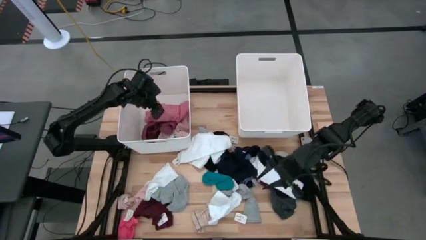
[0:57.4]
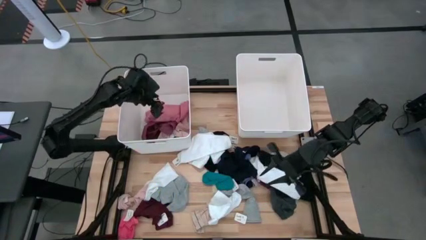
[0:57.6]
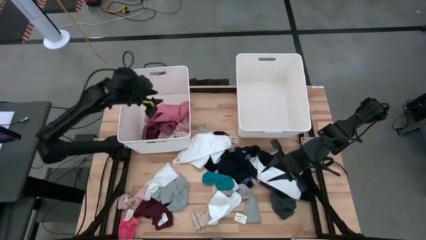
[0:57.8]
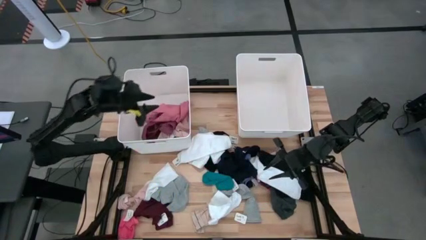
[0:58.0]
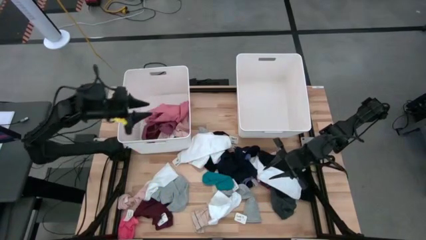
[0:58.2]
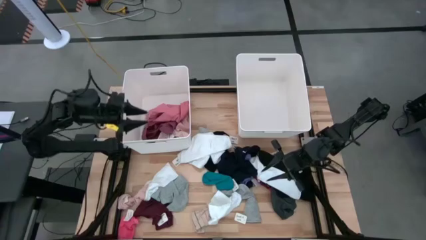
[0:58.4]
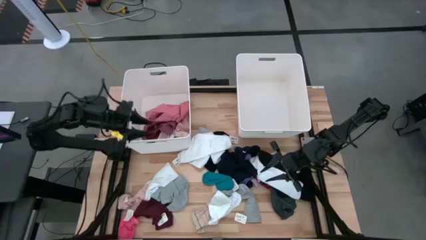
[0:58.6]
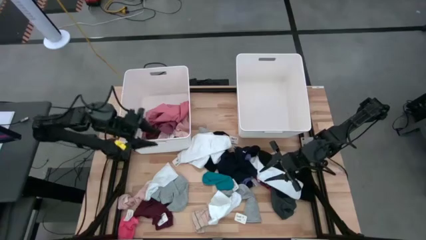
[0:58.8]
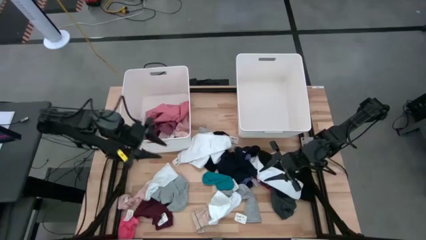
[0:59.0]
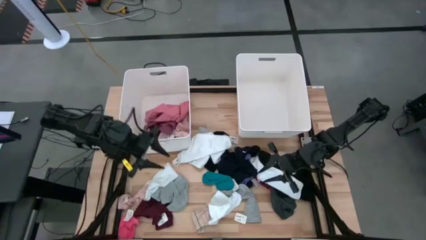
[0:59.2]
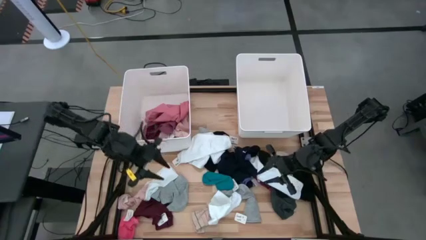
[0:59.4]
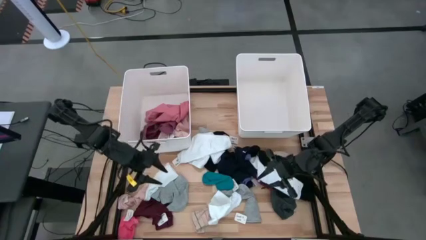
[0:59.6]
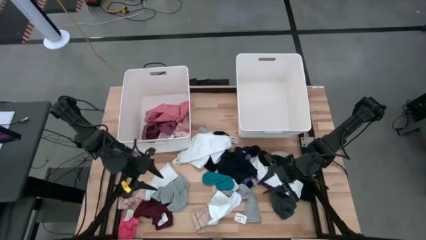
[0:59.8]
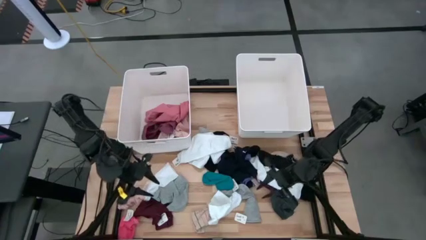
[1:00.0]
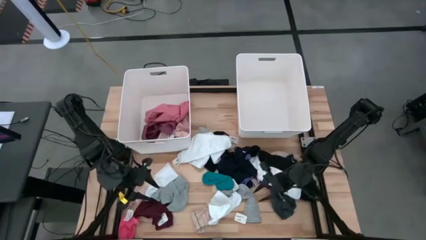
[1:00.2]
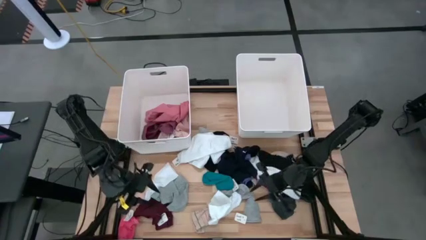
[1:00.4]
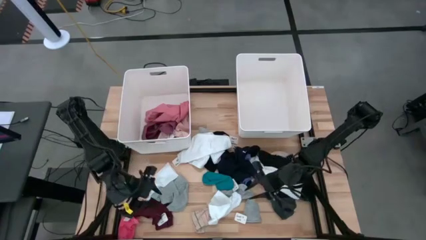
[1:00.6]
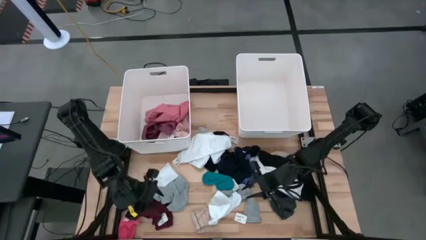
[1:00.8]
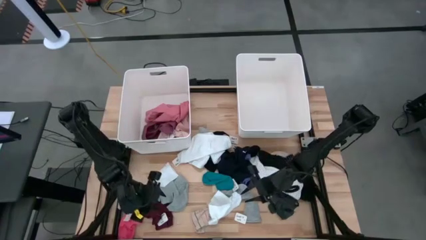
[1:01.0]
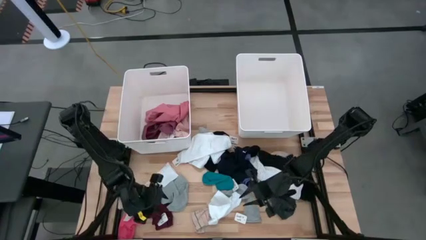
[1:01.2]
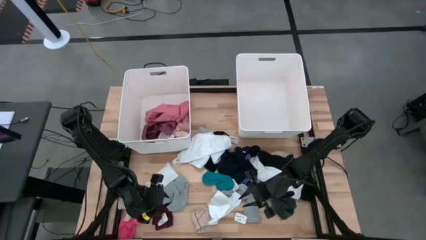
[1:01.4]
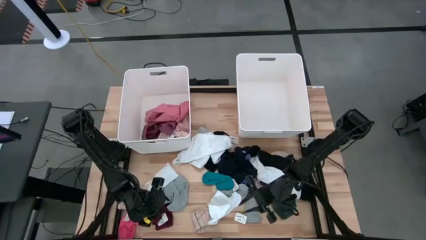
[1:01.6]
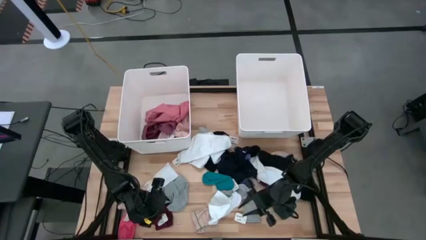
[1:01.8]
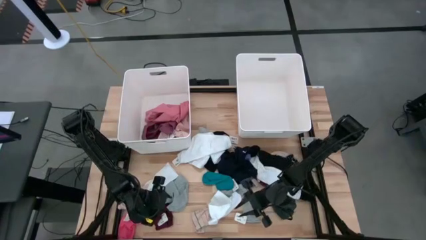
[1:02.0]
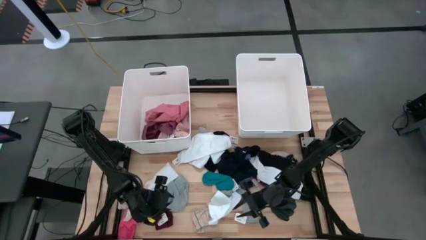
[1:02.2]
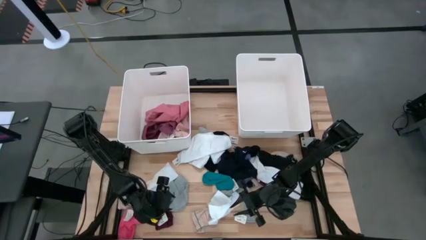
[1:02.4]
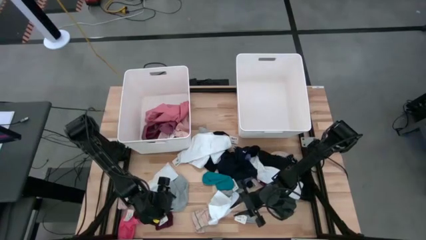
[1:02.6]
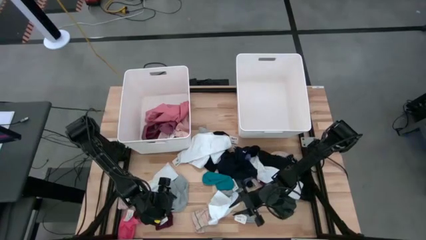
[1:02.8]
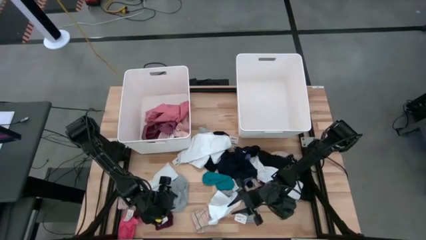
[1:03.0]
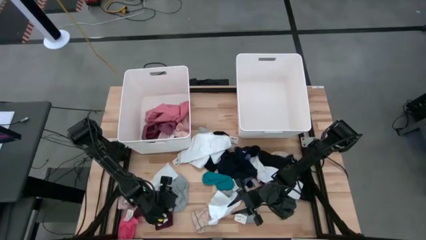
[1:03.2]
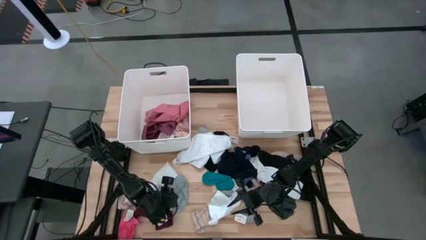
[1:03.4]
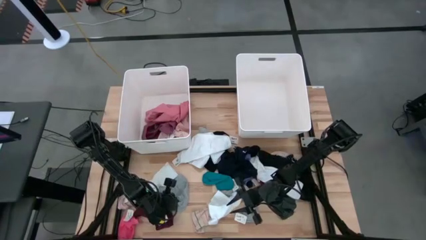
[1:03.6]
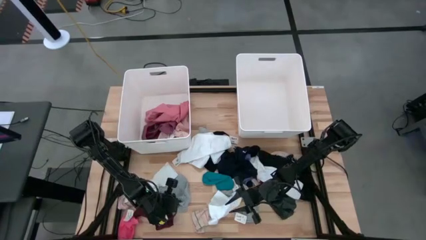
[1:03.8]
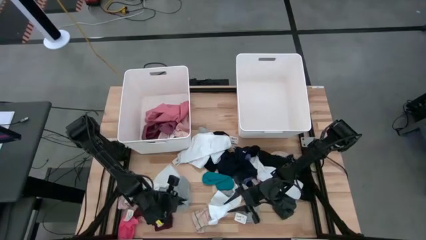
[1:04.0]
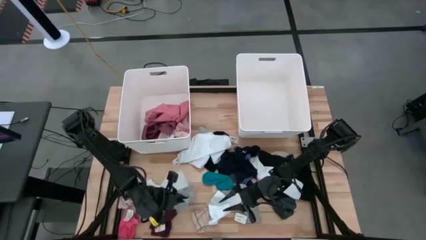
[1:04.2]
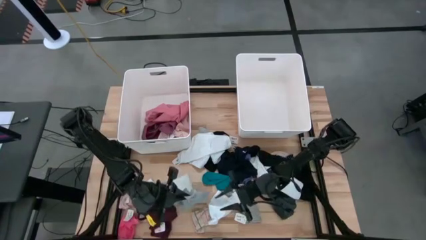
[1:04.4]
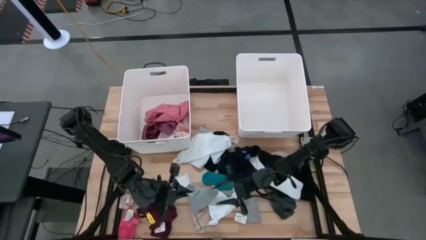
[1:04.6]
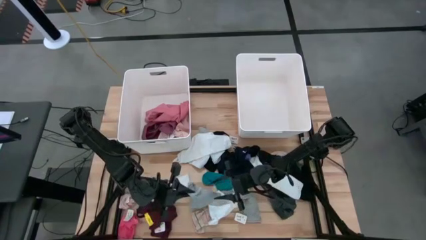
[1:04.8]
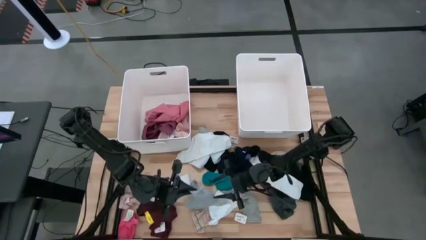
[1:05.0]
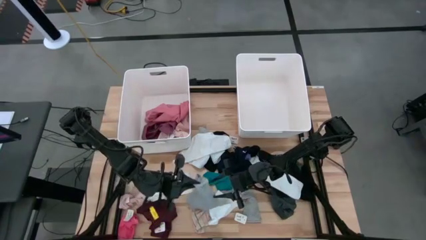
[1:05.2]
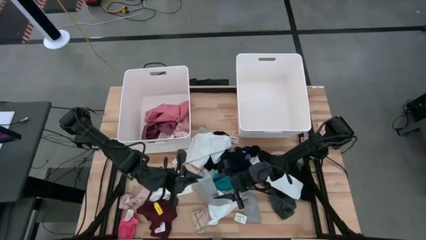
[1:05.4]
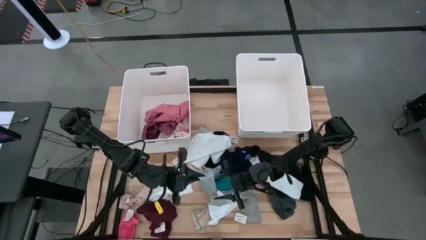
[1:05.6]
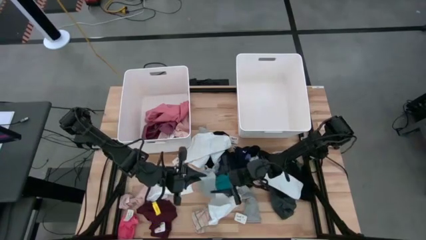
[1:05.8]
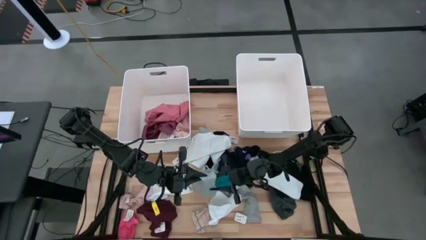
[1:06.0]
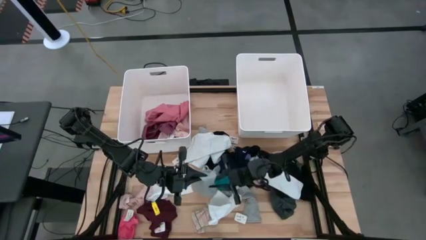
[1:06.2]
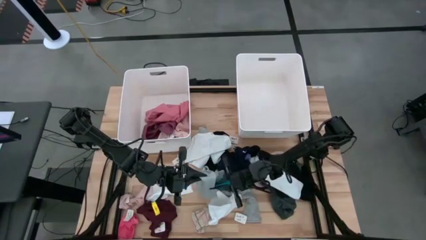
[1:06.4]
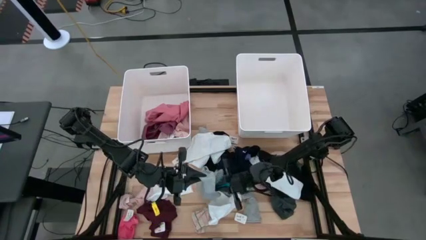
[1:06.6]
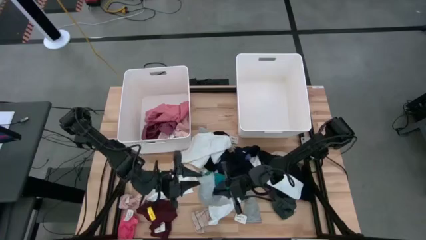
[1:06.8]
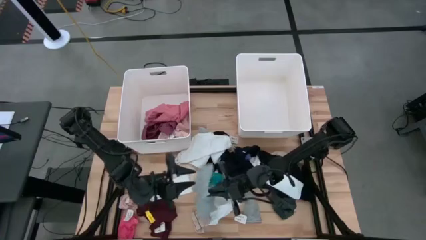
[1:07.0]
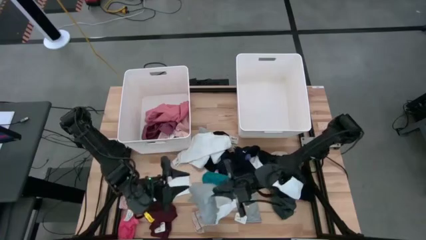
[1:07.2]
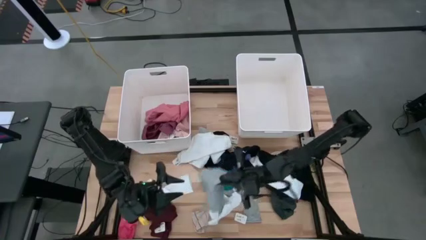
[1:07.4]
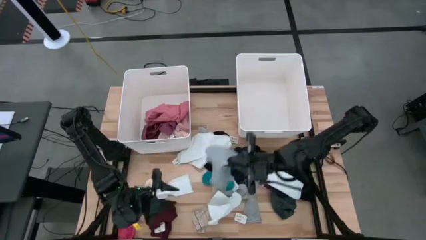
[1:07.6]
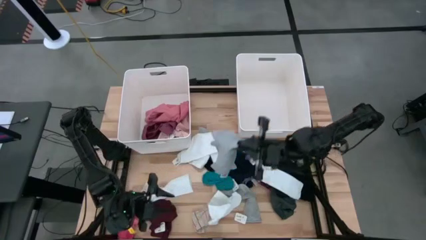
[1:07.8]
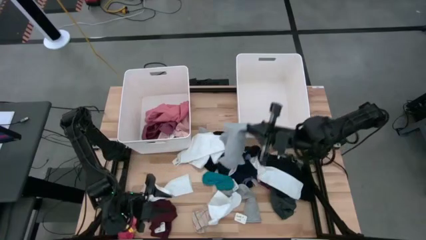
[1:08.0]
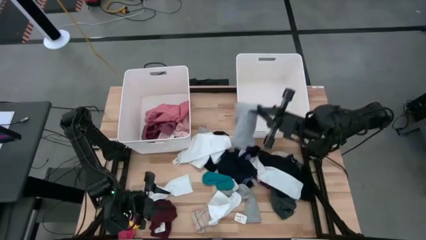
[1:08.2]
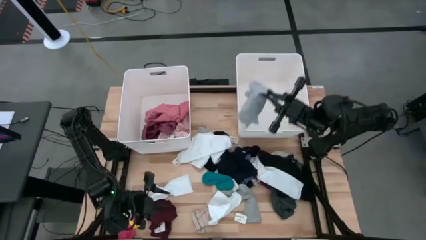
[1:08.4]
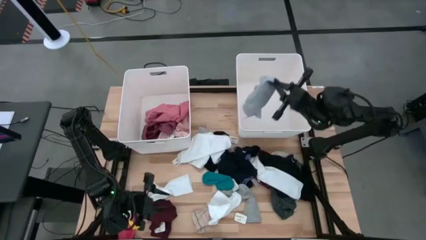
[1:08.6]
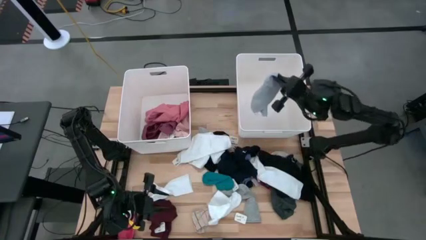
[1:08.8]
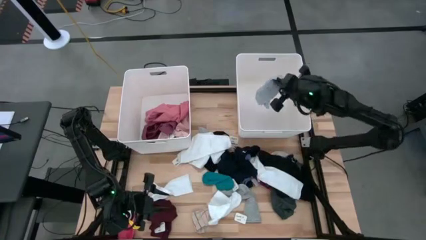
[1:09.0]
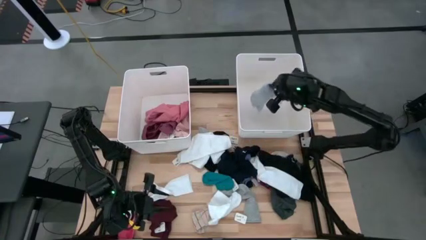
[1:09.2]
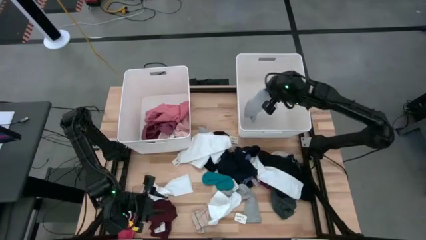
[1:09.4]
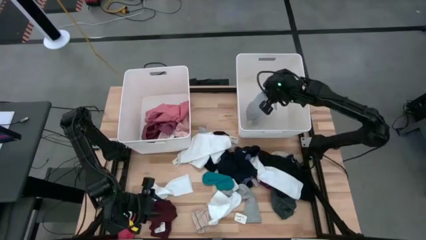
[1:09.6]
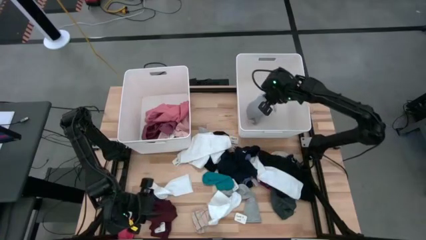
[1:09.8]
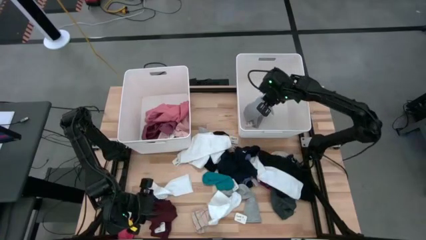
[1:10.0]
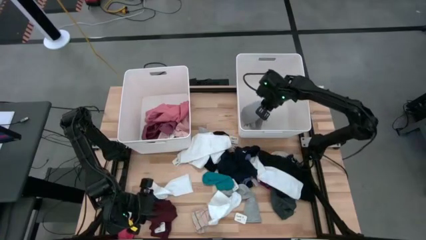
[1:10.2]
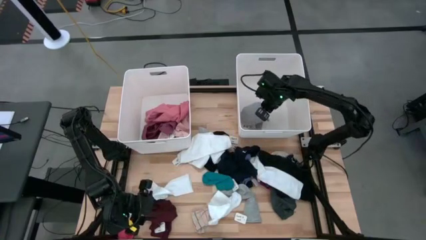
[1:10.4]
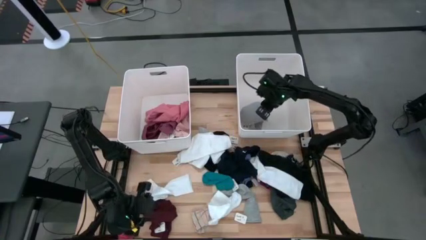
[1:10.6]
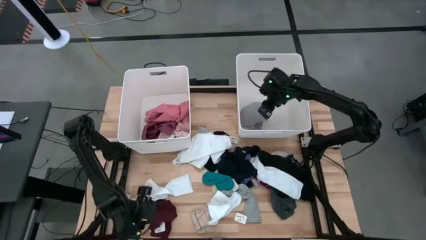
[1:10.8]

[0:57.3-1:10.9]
Task: Sort clothes
Put the gray underwear into the right white bin
